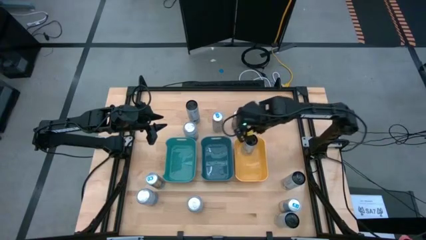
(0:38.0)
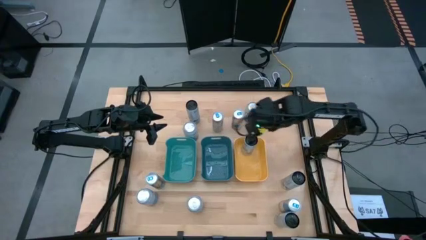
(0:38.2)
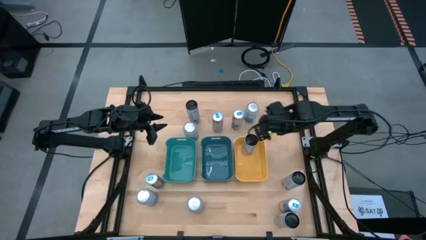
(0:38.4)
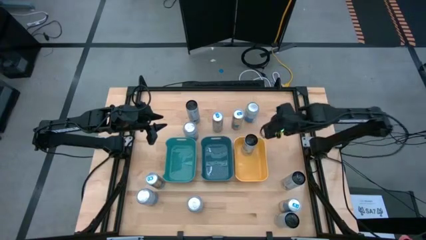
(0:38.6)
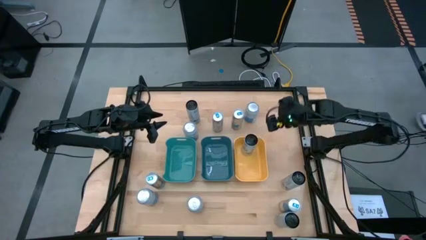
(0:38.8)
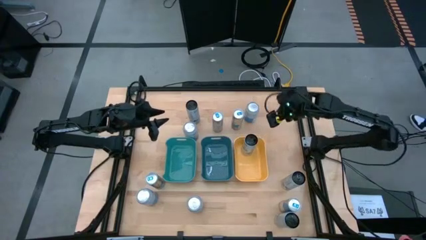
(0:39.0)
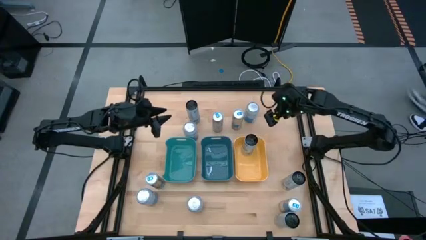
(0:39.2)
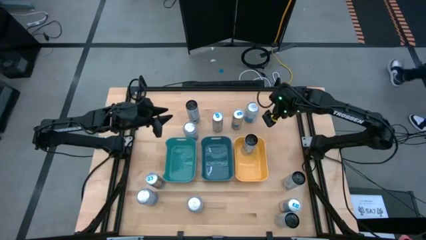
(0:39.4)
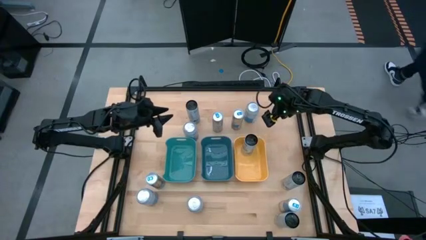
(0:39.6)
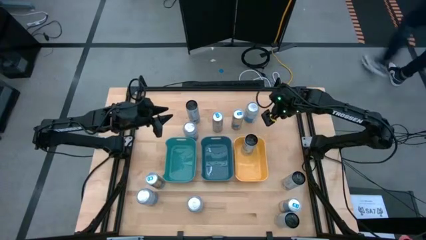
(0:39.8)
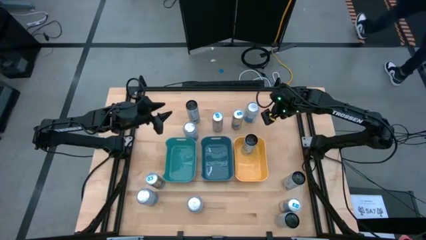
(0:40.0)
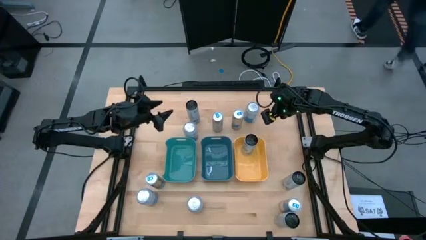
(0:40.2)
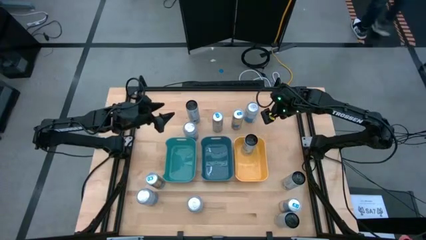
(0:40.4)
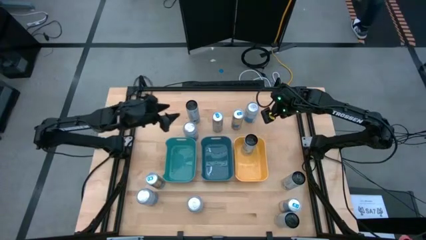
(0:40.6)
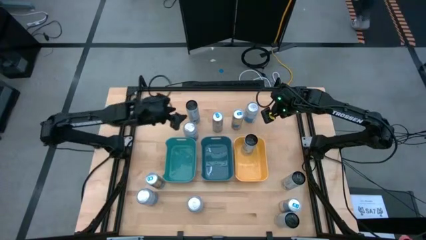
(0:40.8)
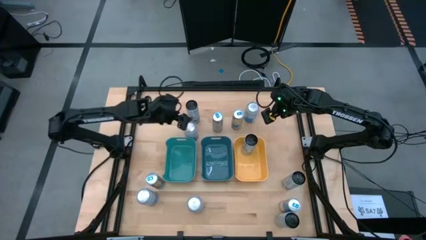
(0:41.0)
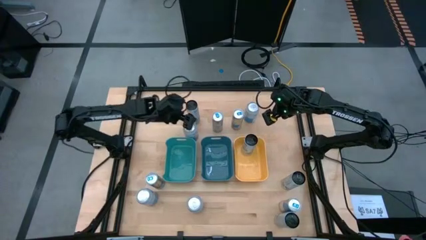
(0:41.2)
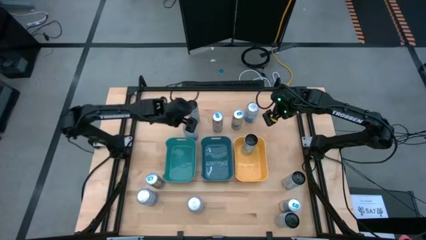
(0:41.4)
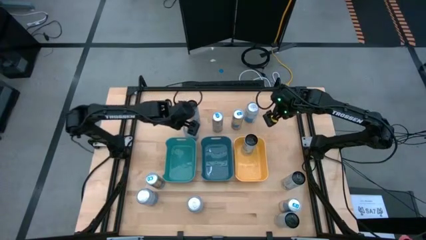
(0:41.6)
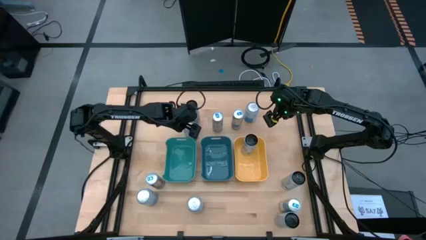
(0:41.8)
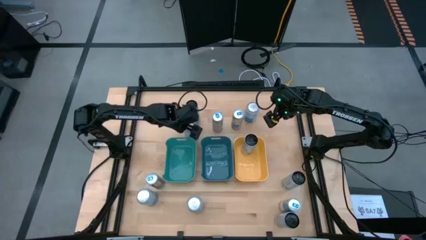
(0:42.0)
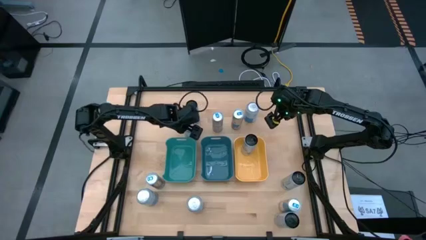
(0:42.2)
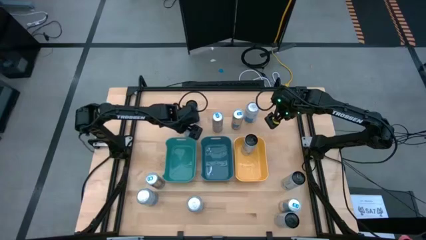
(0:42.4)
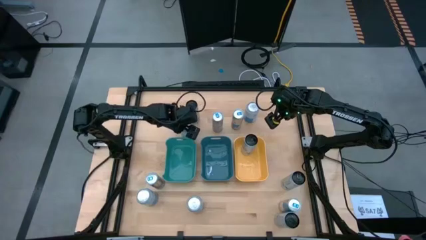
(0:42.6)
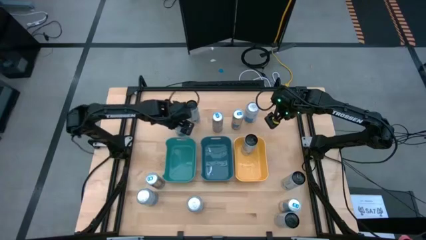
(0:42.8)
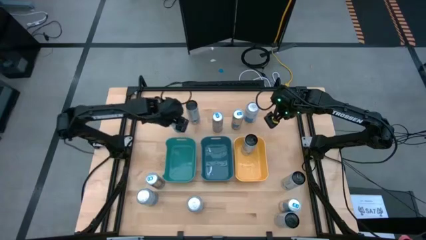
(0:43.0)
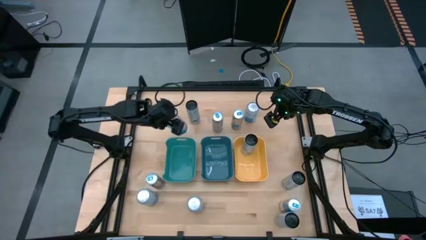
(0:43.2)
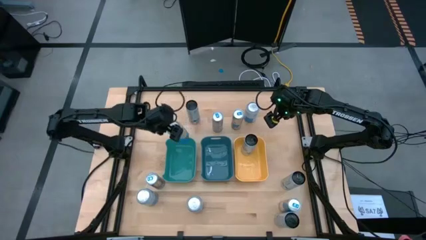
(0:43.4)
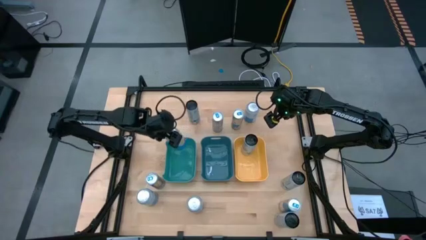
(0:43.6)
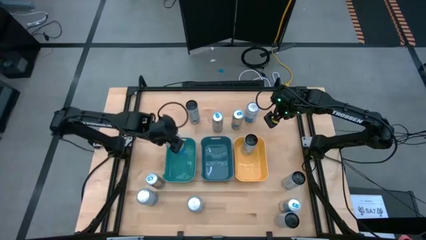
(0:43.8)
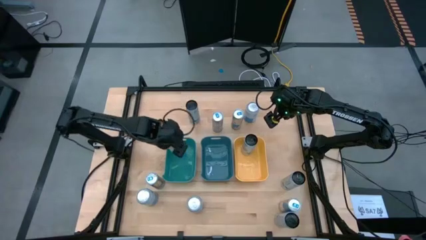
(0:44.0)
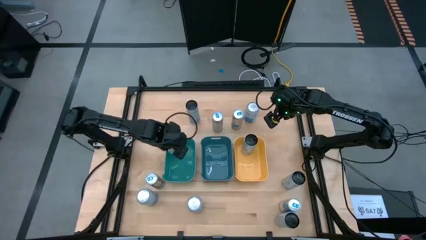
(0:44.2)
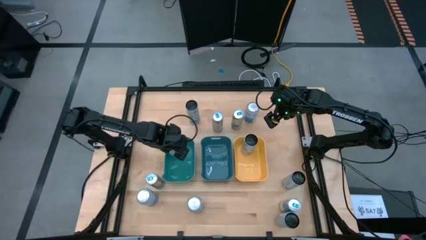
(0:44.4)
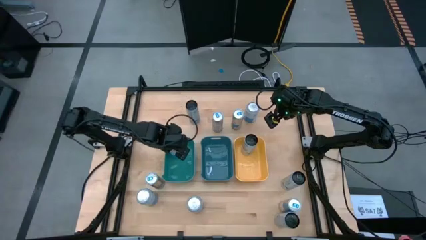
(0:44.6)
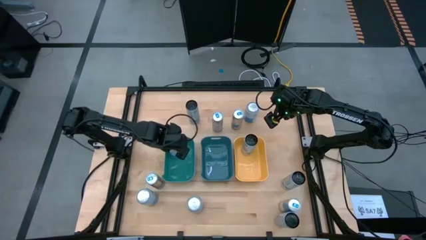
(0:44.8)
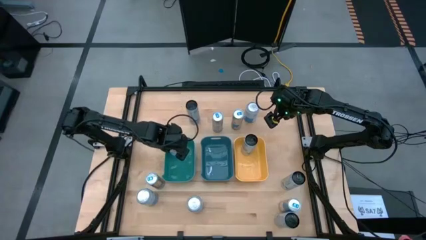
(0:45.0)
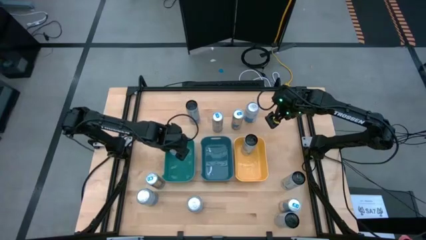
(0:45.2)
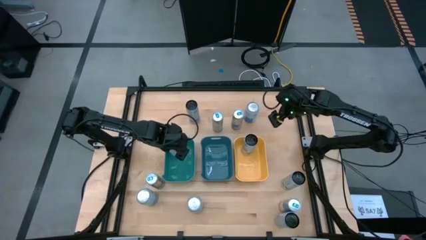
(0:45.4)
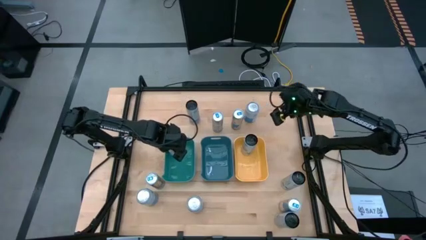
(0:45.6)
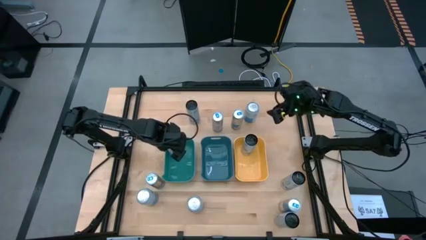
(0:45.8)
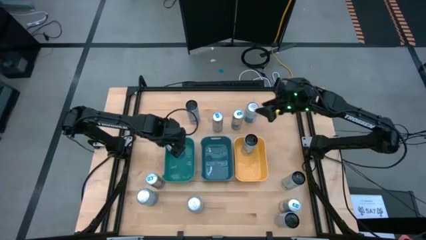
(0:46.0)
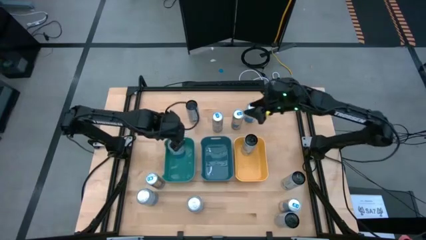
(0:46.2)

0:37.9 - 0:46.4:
Task: Sort soda cans
Put the blue-white soda can into the green bin

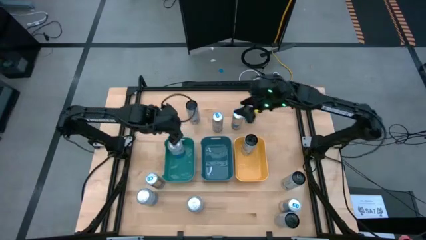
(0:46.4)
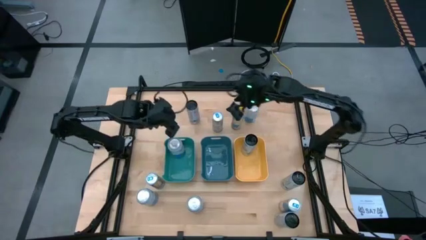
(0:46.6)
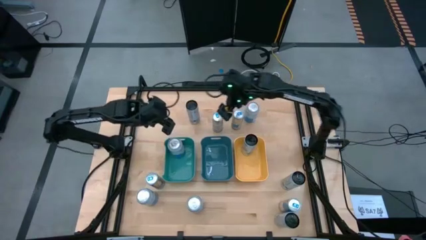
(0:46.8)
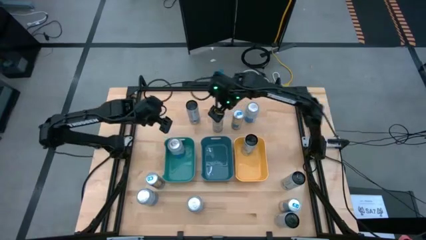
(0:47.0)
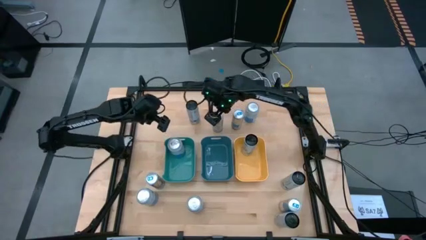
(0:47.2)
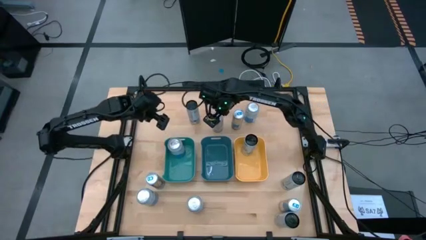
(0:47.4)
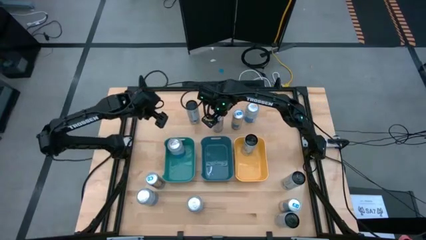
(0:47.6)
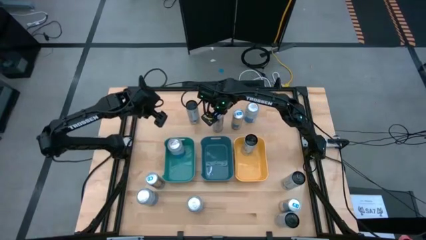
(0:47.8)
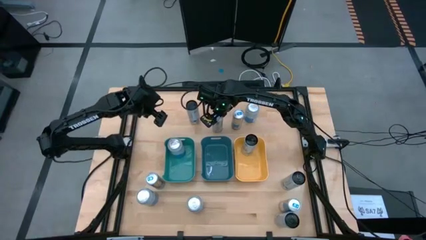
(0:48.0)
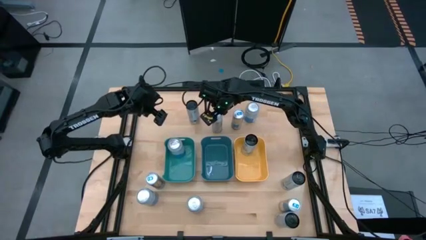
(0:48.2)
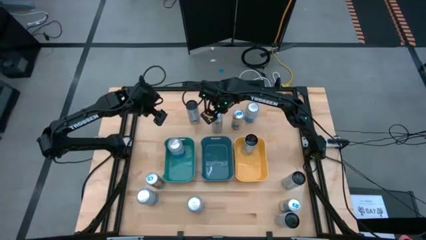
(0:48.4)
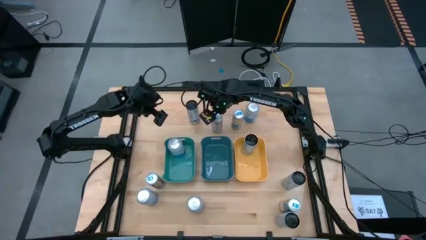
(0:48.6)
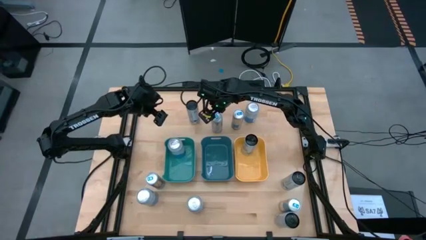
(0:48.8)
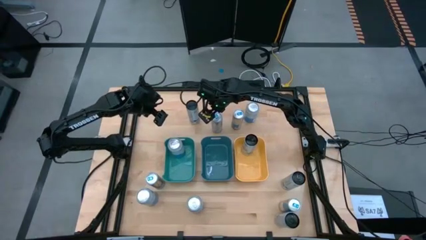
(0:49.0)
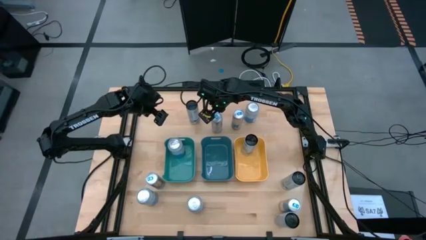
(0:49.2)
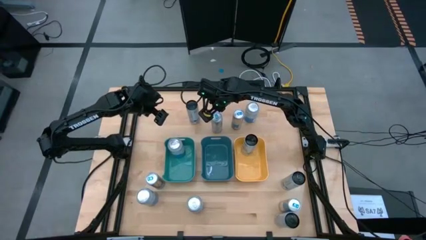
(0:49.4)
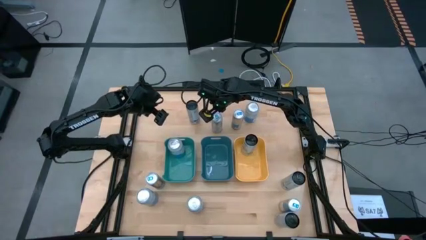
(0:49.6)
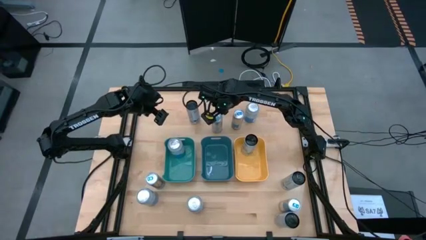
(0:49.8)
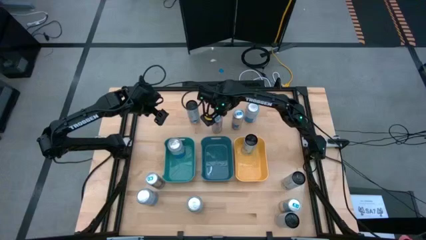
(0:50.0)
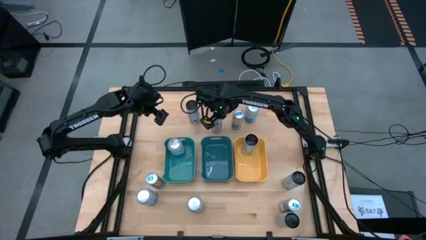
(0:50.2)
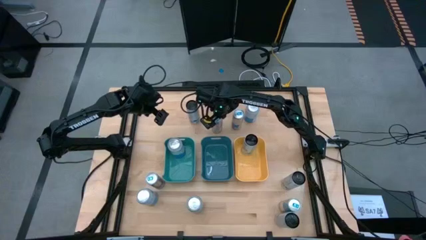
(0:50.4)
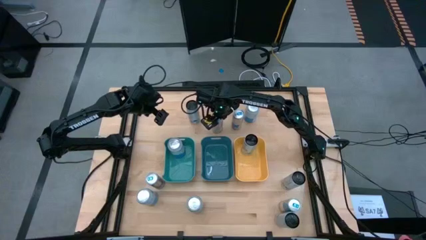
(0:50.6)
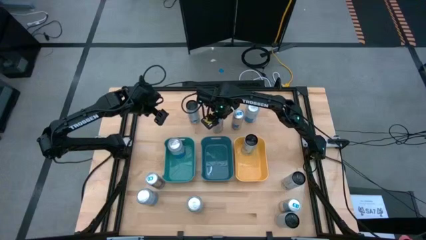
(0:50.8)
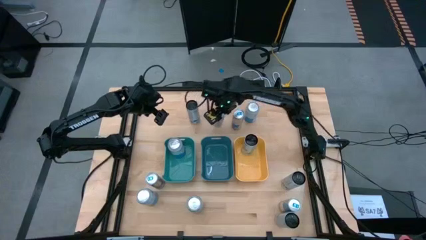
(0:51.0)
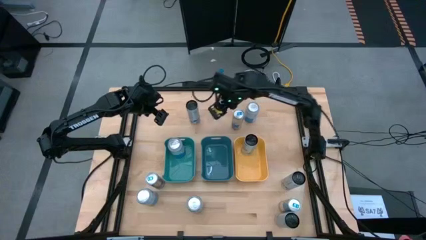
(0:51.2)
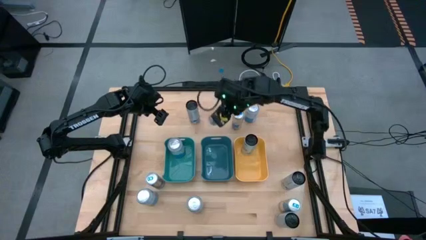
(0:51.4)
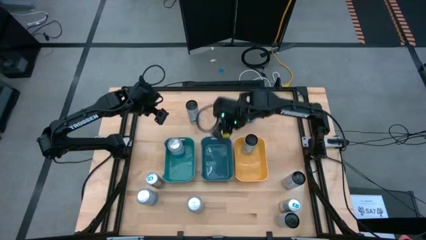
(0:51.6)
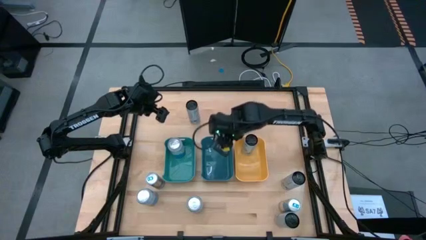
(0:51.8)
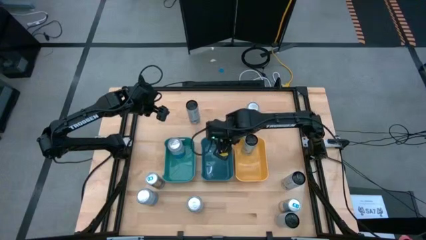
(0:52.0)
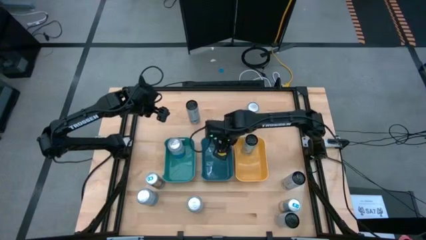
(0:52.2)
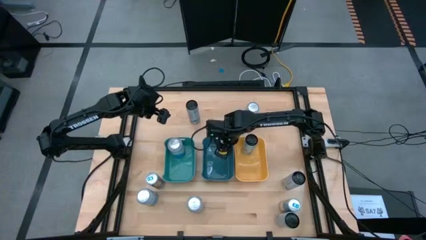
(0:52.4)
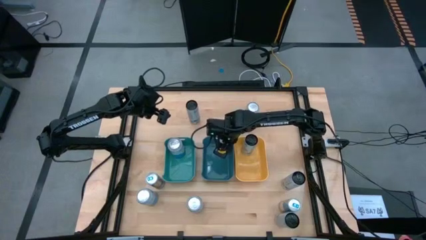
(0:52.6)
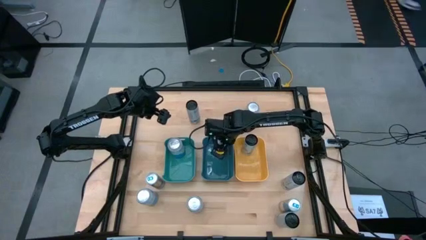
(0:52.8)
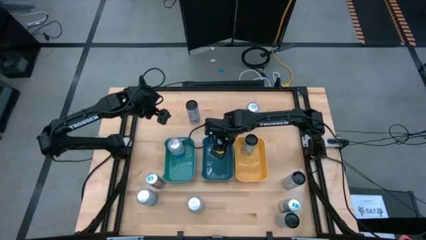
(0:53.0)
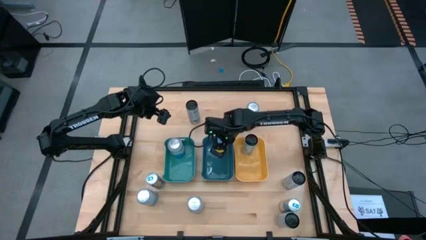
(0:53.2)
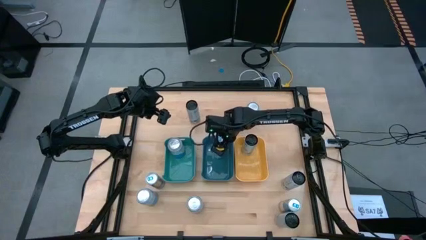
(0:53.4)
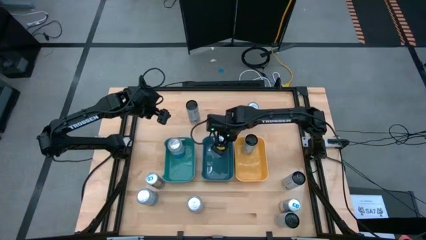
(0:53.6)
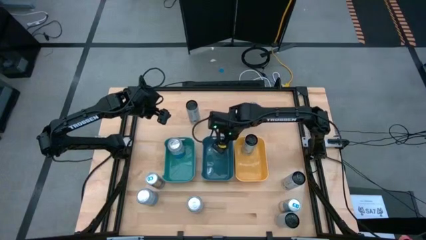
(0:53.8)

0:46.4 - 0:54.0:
Put the blue soda can into the blue bin
